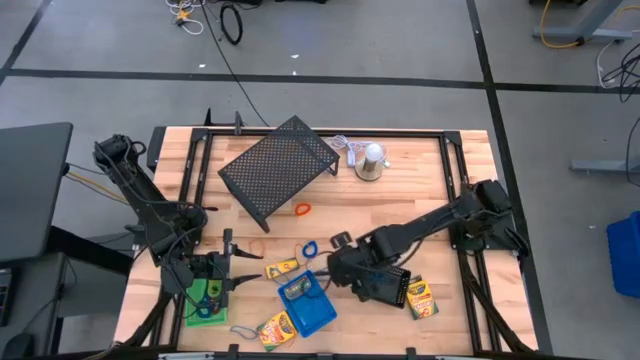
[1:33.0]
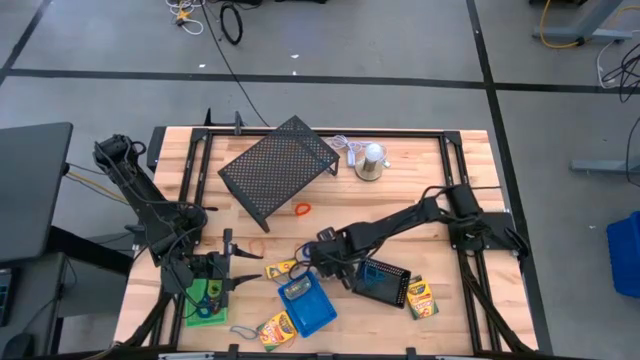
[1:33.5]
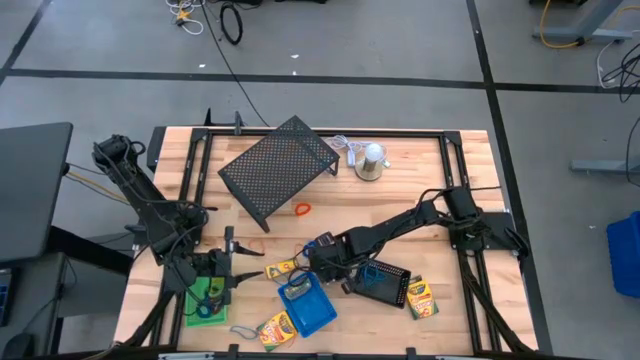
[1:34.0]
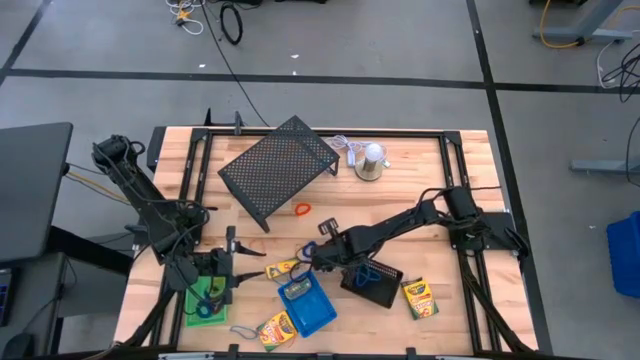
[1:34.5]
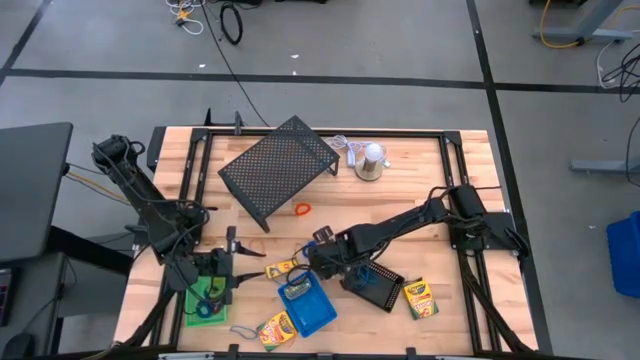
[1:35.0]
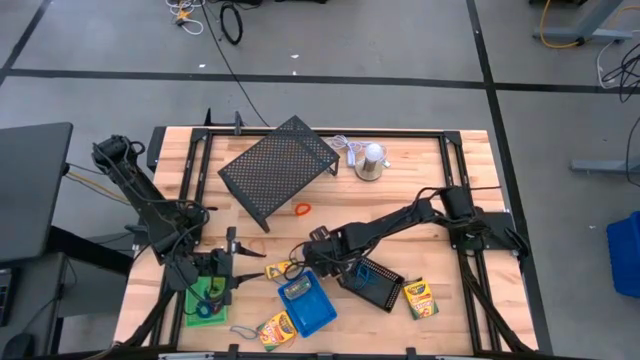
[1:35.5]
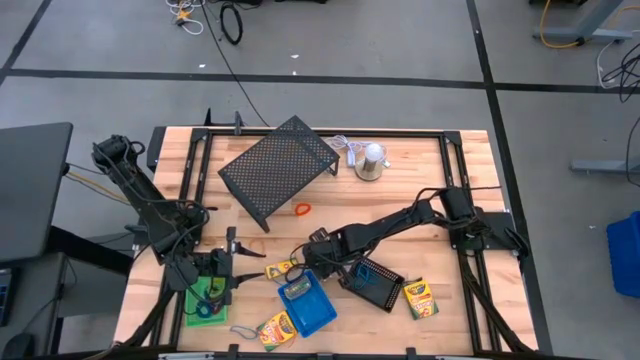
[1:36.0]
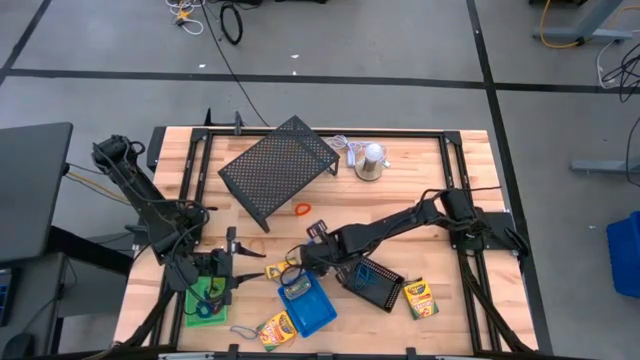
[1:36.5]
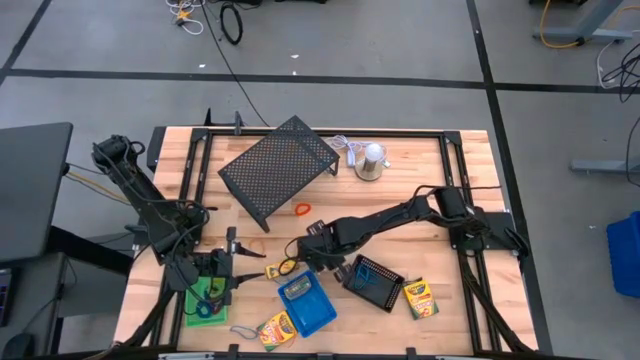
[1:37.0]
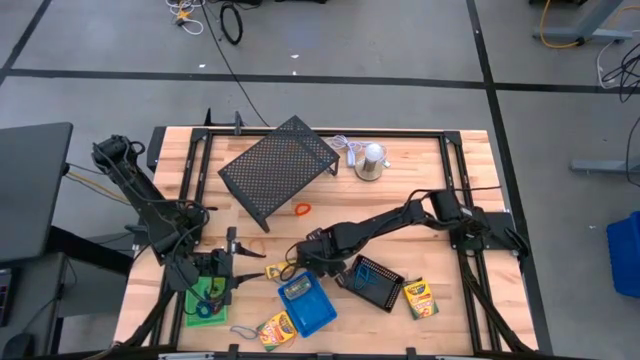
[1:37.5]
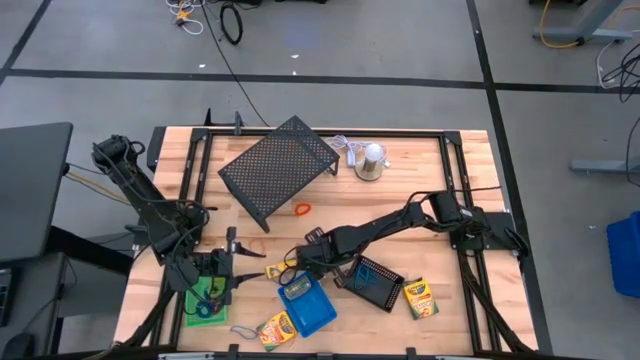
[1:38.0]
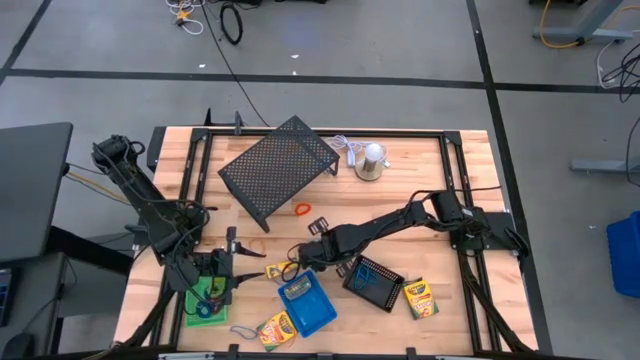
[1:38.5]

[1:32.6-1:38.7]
Task: Pick & Place Office Desk Supplies
Put the blue rubber band into the black bin

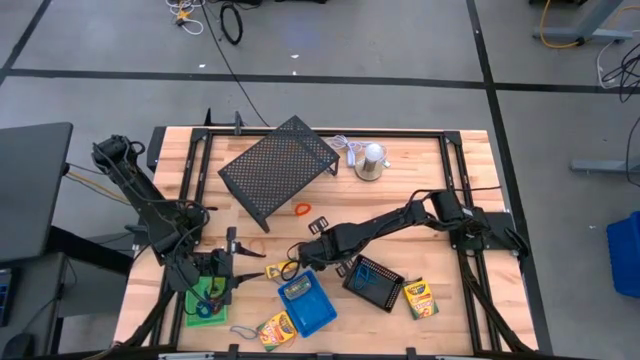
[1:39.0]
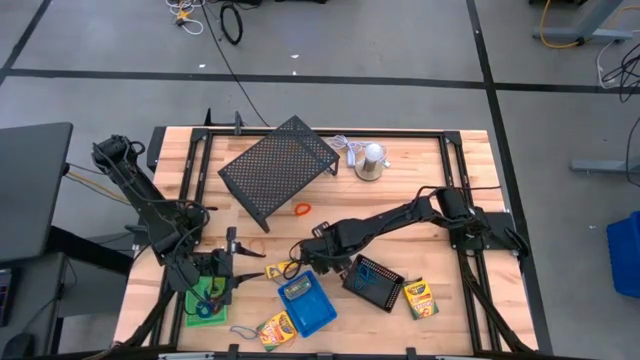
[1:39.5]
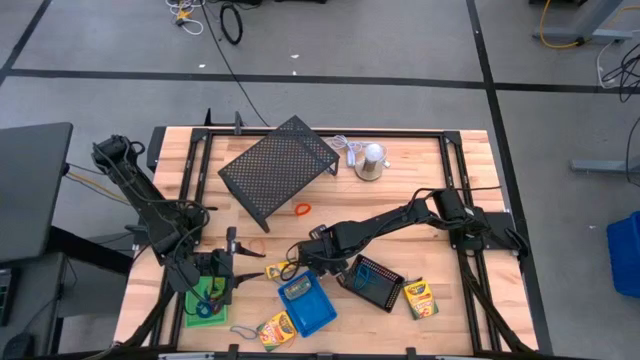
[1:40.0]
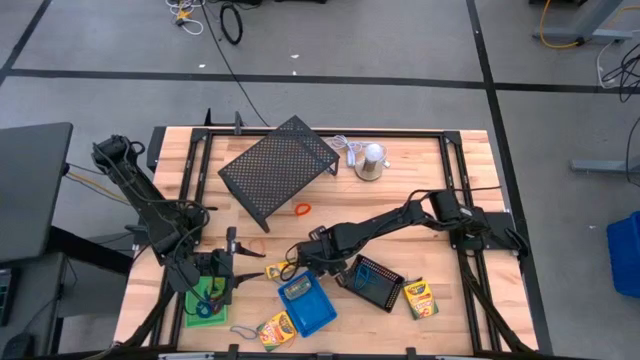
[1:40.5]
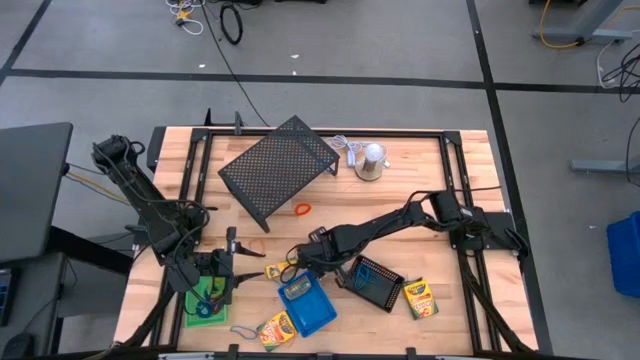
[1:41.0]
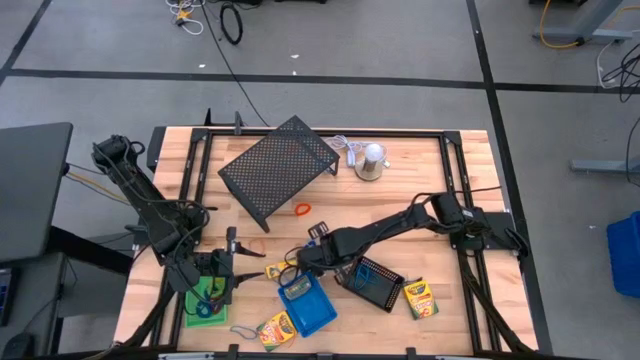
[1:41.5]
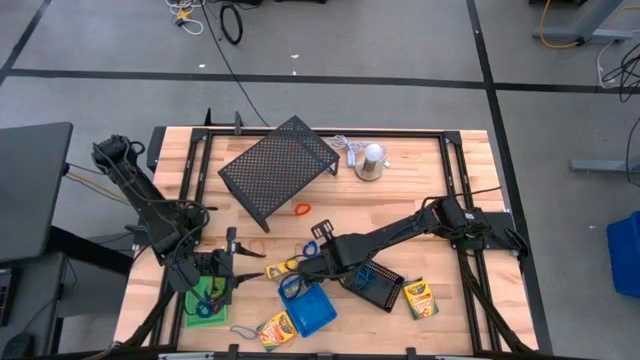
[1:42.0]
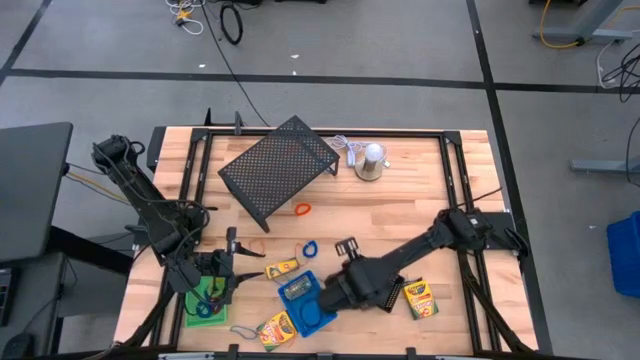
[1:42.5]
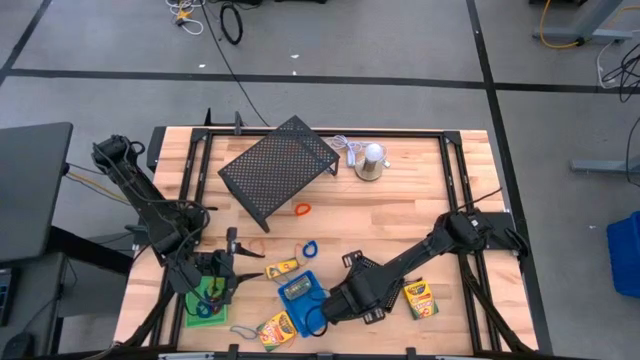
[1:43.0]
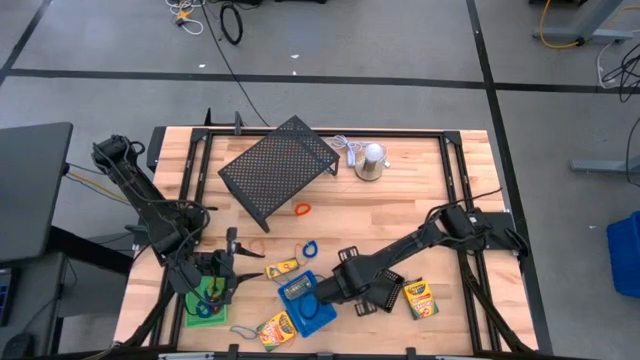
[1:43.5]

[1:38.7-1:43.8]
Put the blue rubber band into the black bin

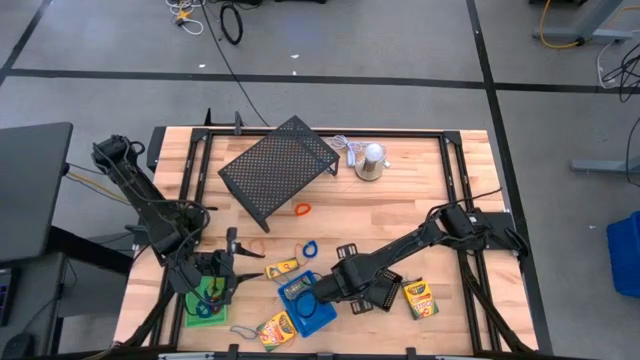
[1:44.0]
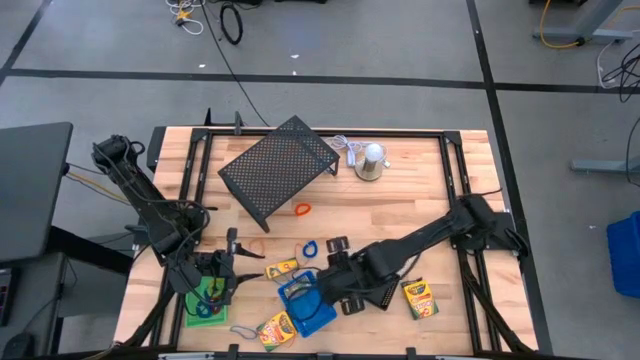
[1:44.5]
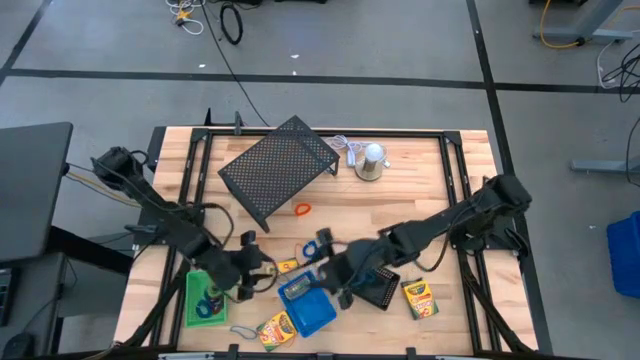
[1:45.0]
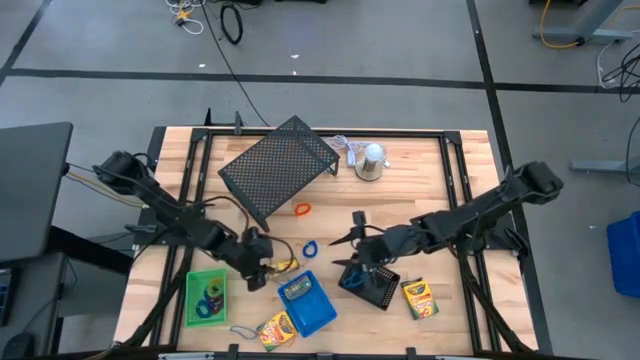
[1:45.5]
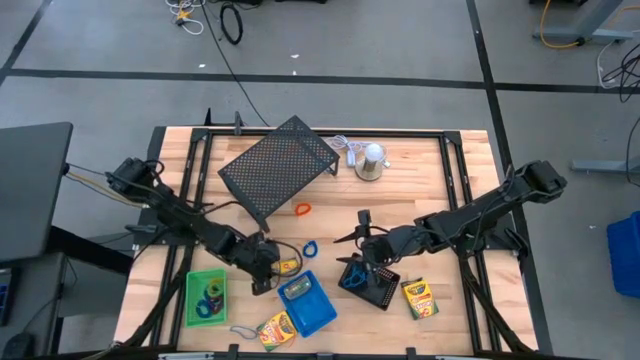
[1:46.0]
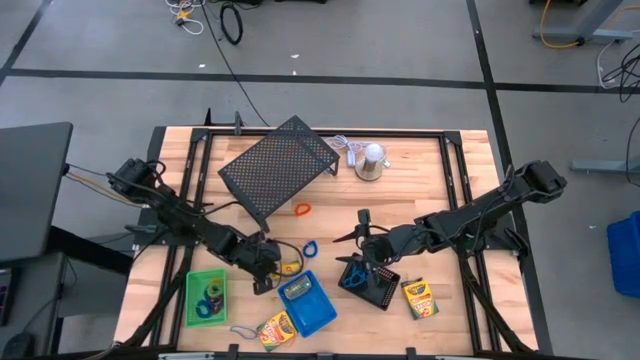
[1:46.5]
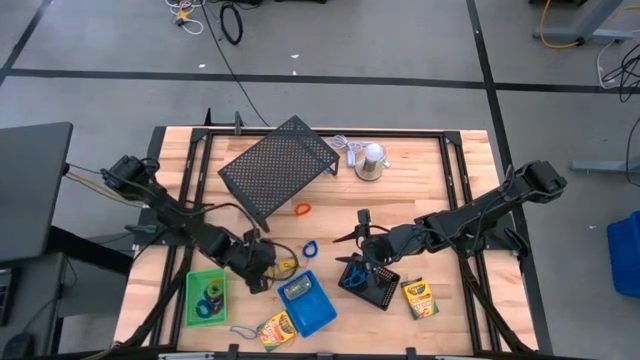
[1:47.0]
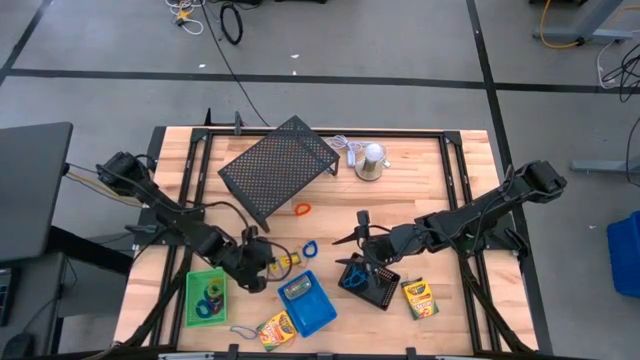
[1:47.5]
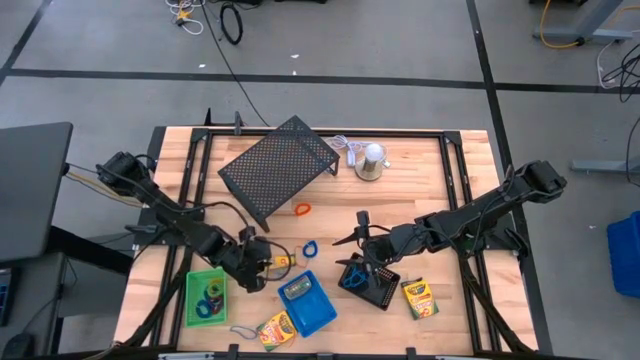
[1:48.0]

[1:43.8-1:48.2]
Put the blue rubber band into the black bin

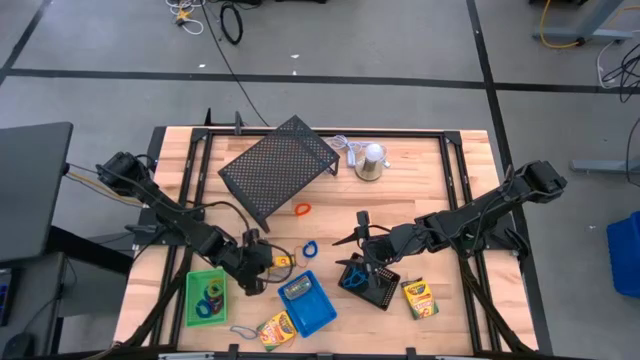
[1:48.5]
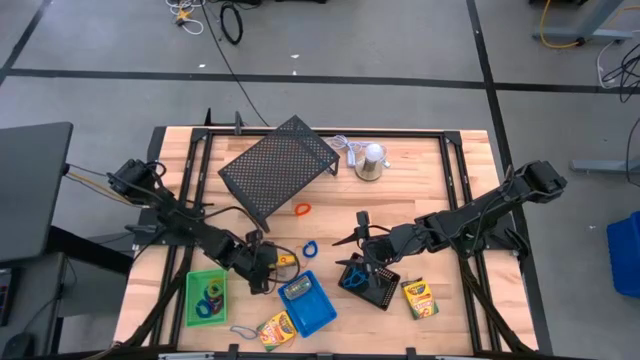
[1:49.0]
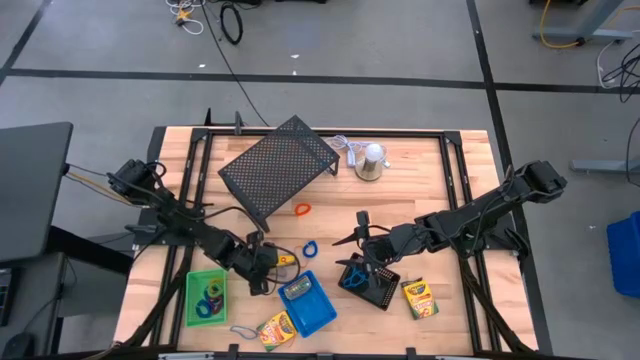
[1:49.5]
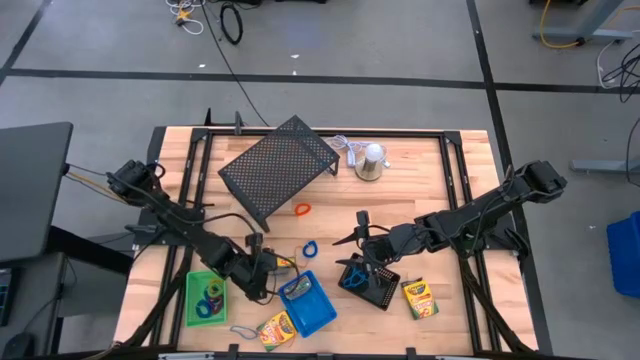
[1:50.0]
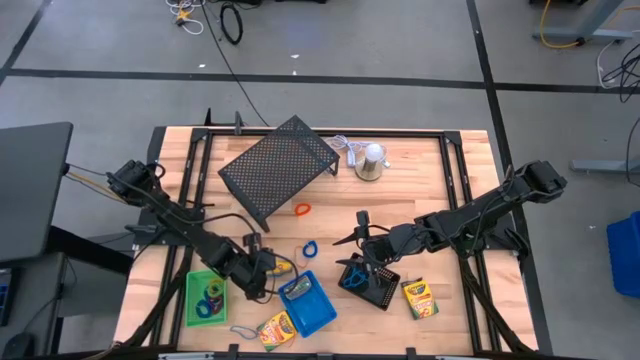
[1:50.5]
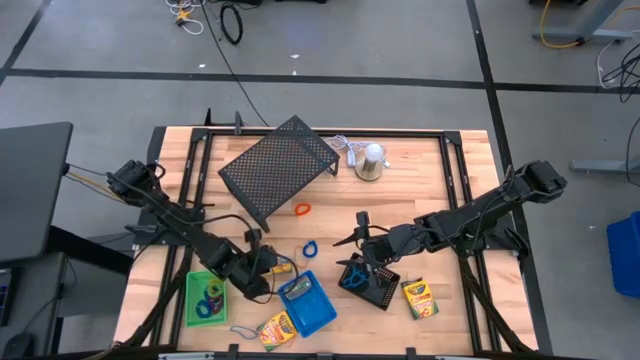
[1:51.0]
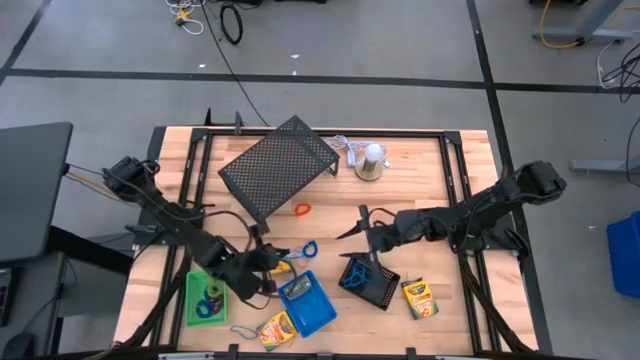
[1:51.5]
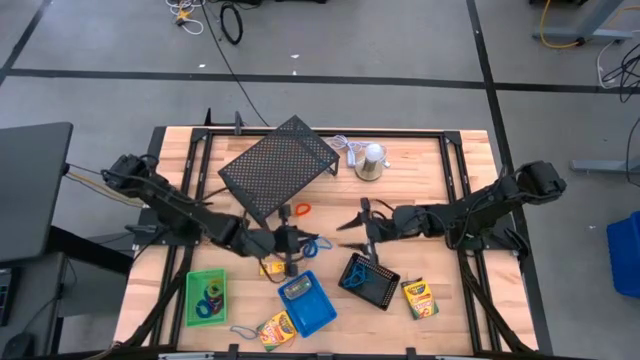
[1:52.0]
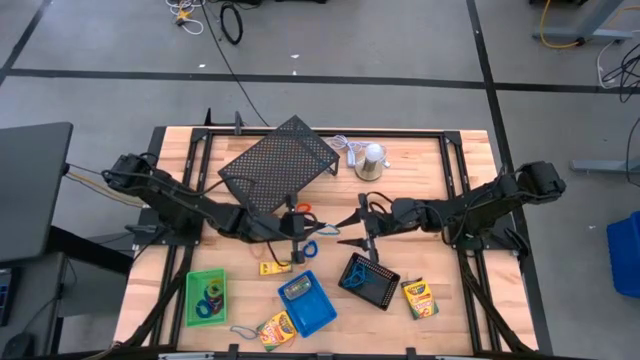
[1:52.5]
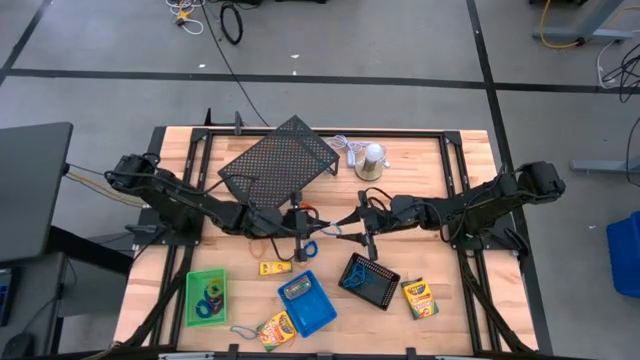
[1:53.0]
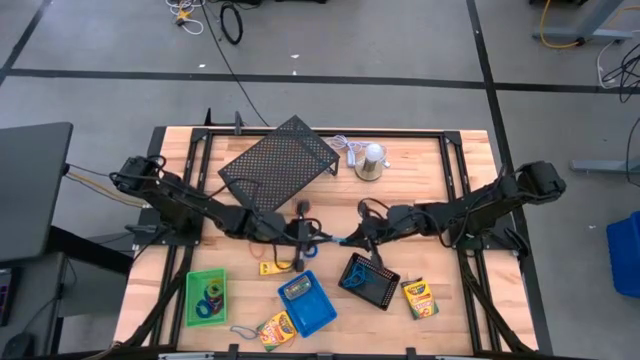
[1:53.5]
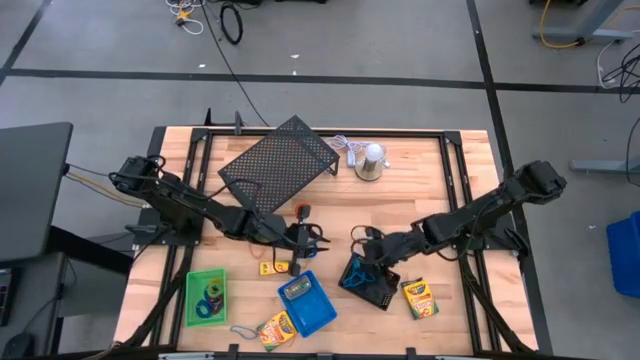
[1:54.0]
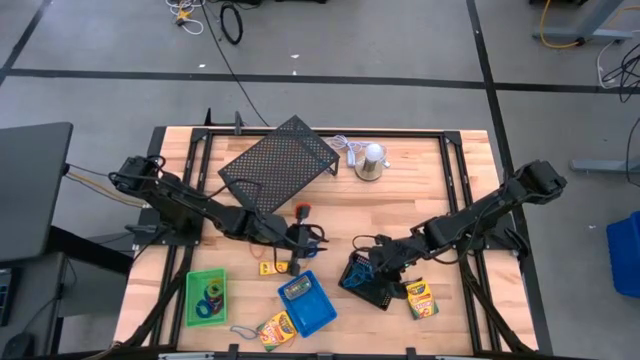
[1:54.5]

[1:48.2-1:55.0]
Put the blue rubber band into the black bin
